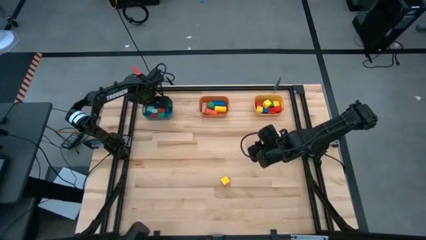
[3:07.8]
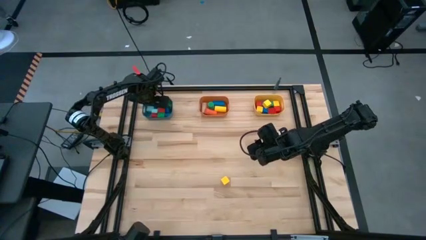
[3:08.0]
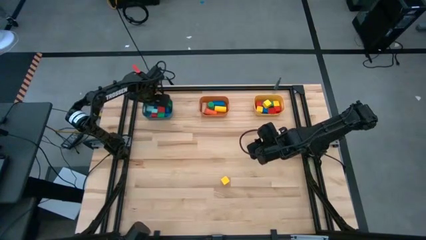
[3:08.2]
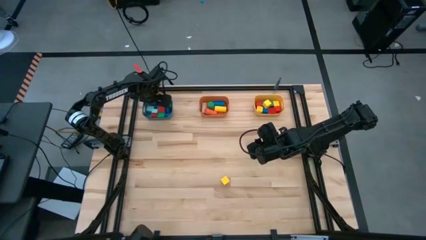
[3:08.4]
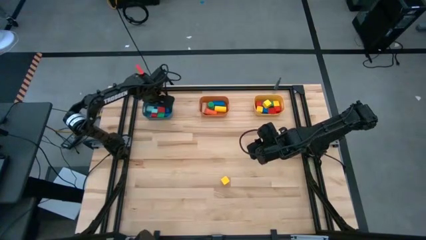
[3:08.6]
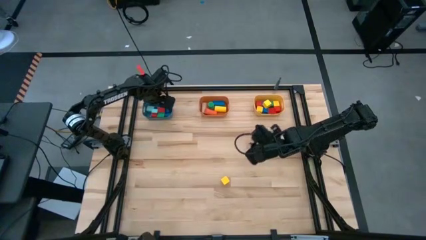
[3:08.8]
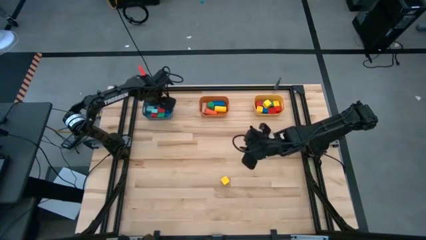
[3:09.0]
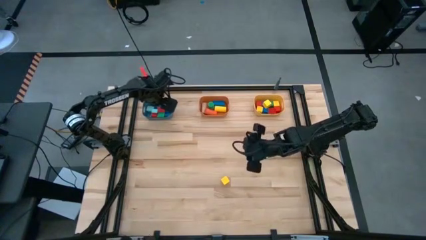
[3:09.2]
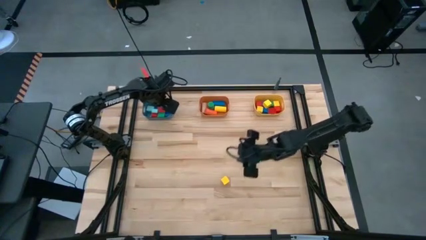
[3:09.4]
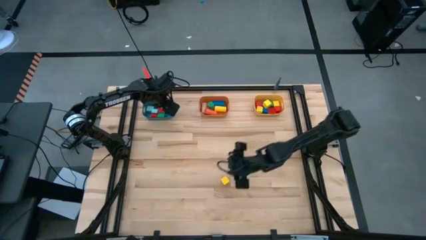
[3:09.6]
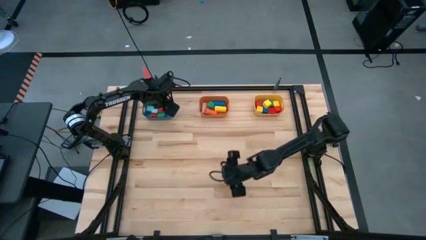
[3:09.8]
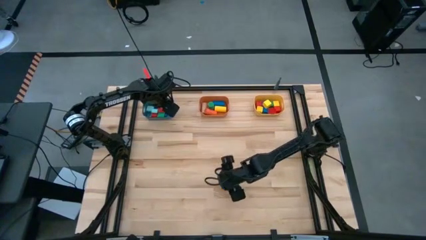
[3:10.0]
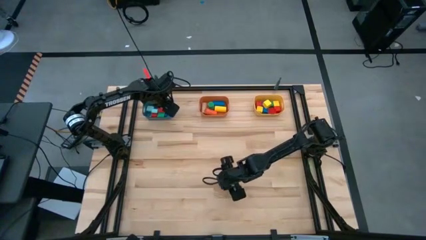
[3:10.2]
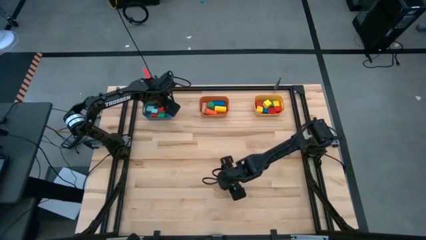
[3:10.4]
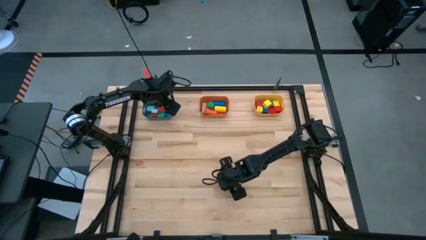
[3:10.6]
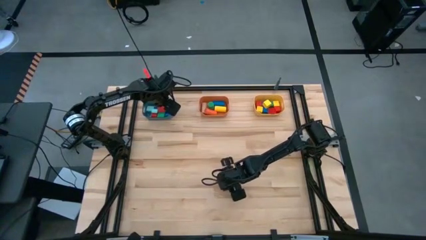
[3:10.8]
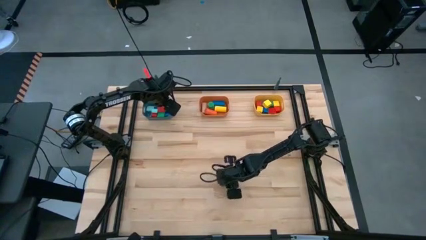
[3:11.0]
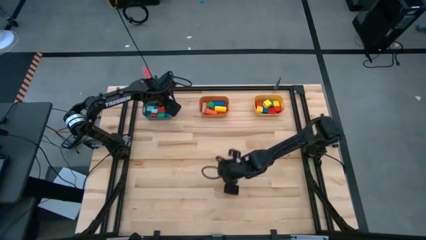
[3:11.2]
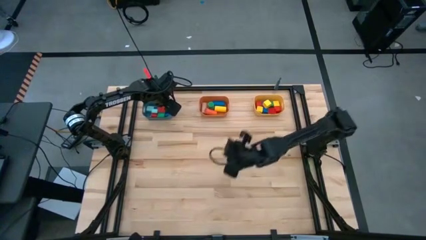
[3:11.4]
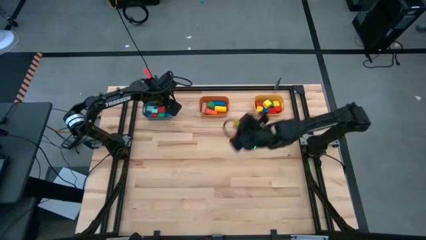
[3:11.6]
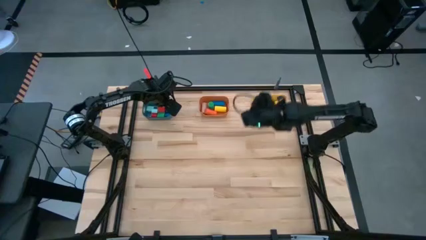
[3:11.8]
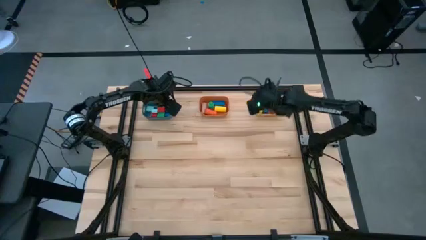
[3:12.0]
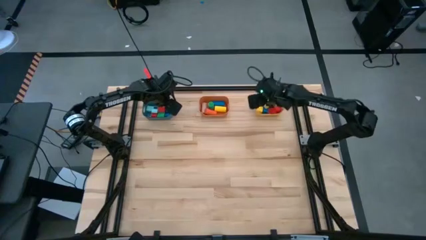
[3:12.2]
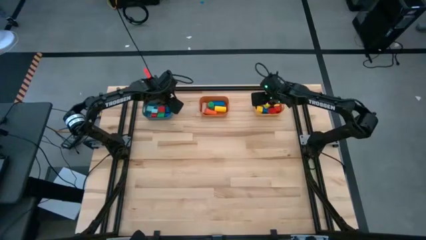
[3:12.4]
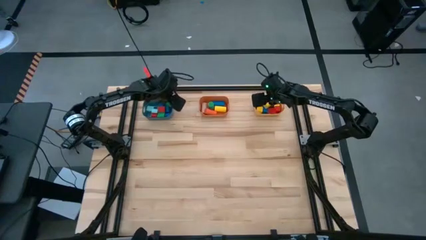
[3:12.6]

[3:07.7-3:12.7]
Task: Sort blocks by size
Put the yellow cube block into the yellow bin

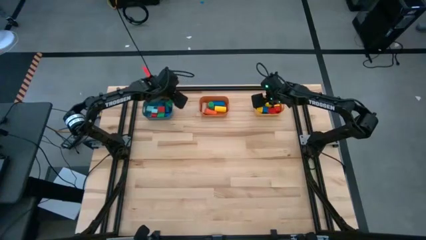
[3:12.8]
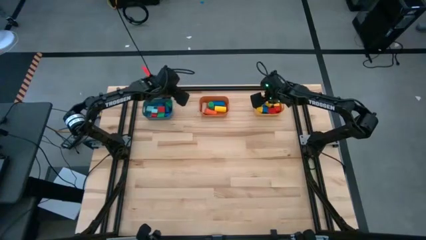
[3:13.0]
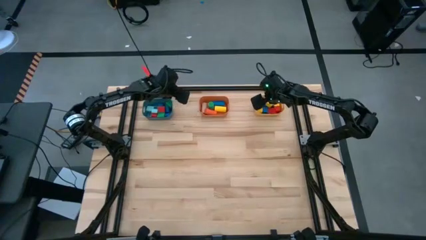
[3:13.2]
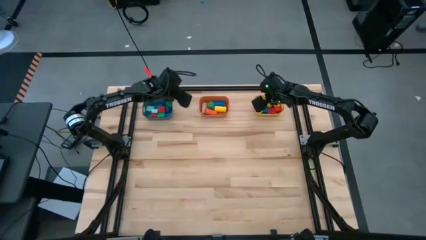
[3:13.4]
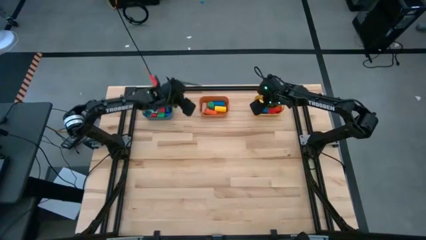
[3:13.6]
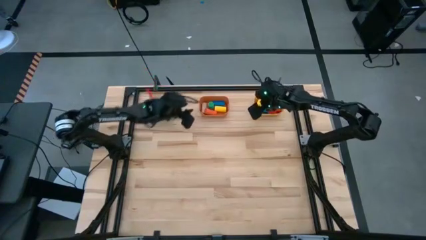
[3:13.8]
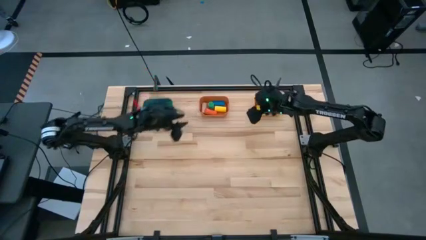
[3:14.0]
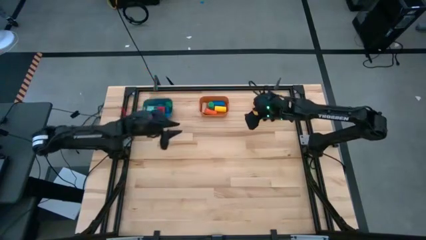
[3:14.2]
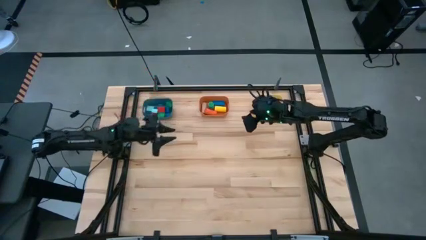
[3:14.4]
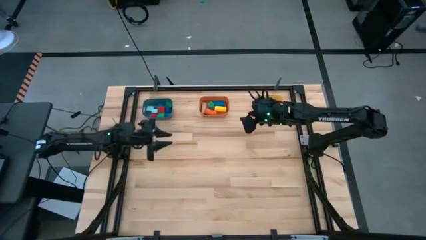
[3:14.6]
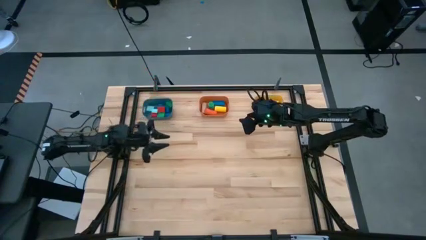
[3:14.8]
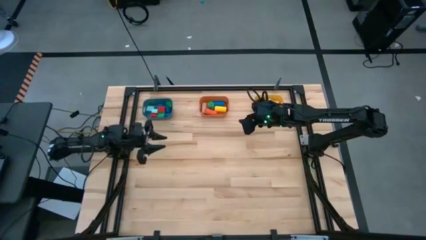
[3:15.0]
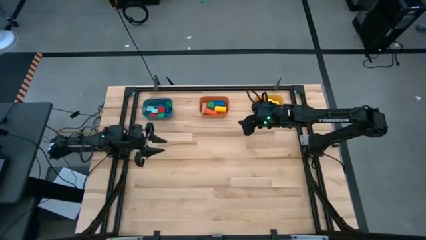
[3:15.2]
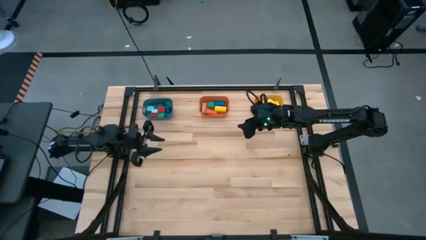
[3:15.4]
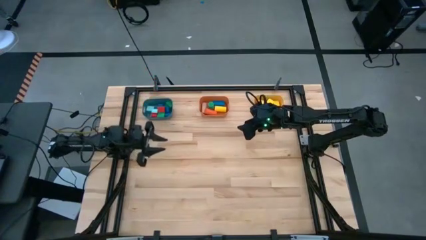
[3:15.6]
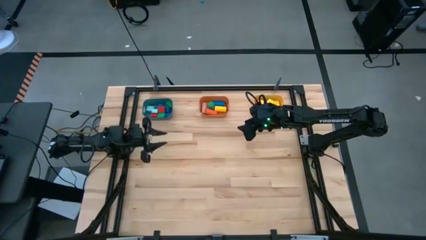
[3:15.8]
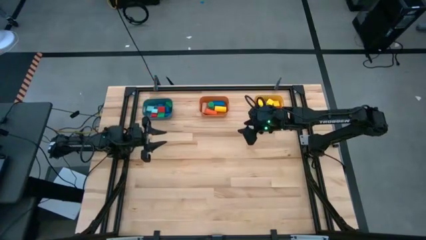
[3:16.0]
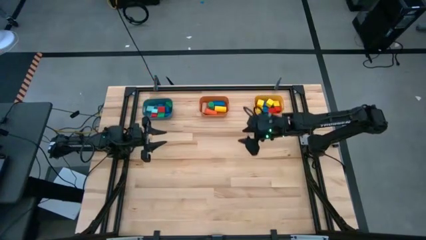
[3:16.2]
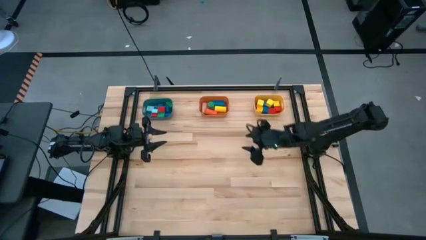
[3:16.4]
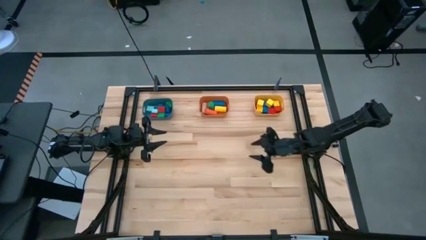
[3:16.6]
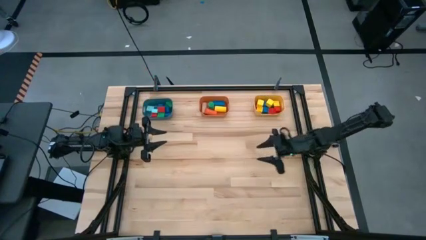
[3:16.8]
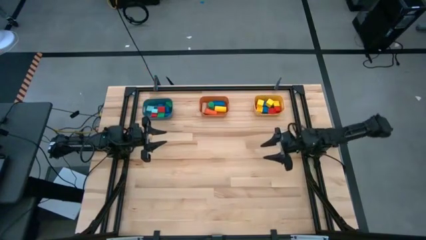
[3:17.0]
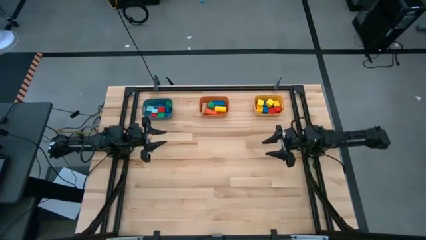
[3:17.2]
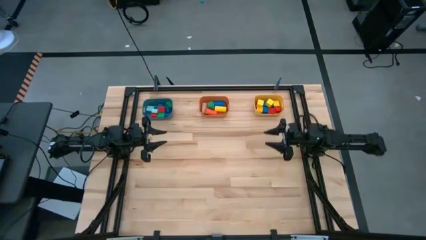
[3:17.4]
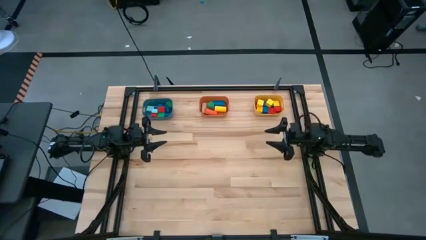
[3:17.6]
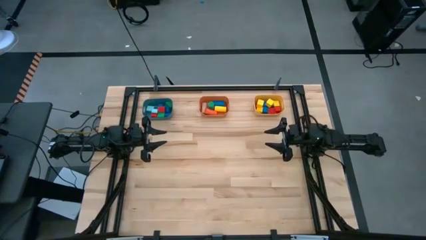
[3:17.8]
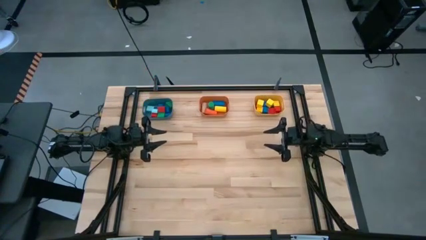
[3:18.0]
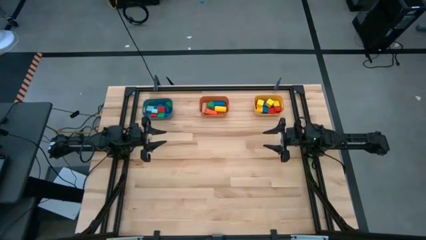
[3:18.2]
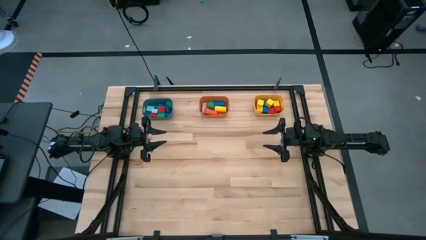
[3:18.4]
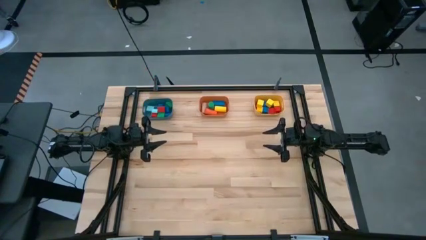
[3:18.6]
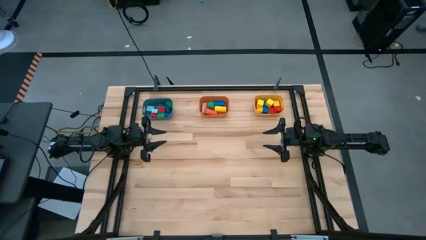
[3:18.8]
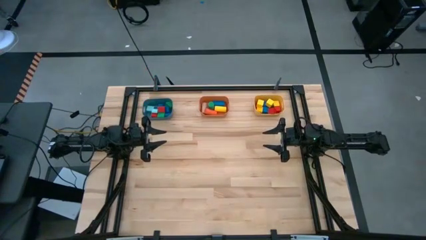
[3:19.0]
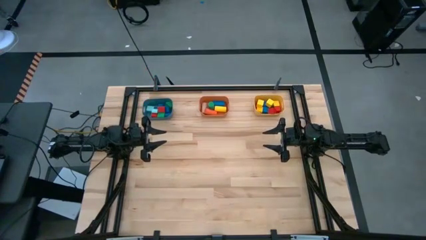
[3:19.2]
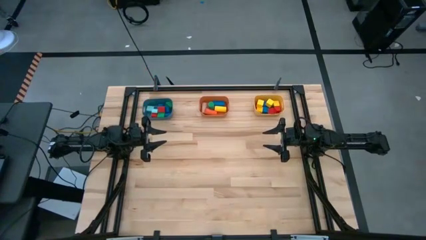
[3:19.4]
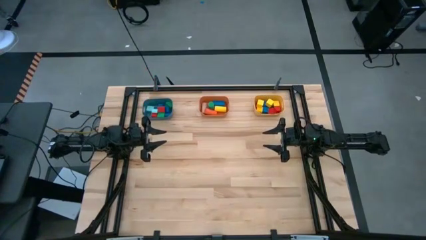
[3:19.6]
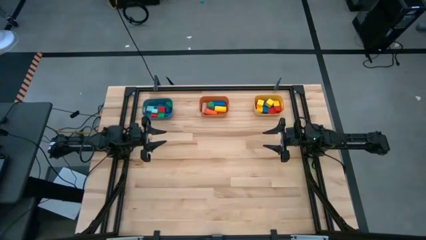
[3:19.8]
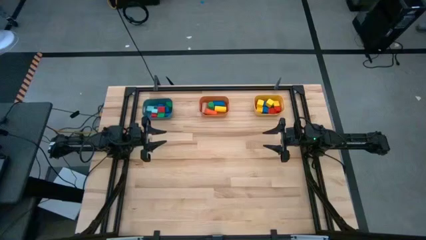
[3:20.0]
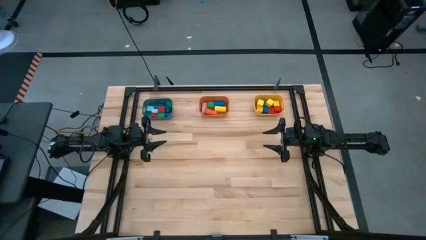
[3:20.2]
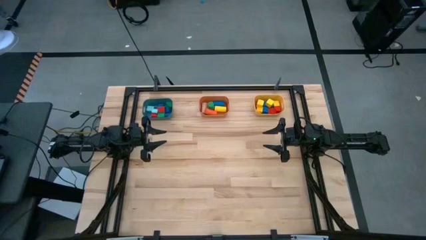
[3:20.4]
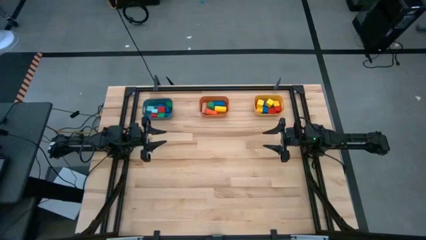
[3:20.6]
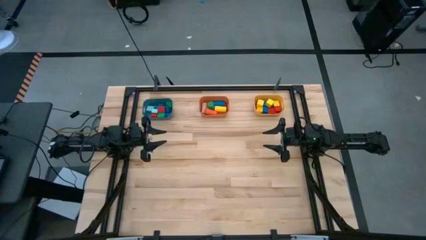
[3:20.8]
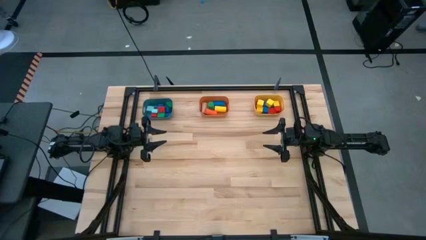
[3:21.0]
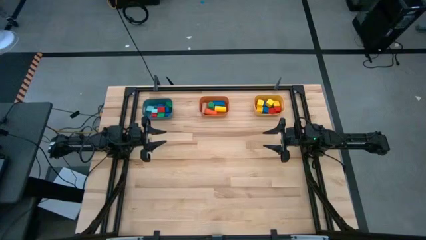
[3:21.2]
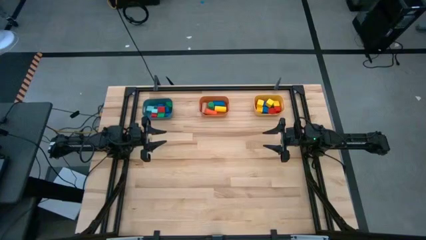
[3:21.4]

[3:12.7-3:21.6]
Return to home position

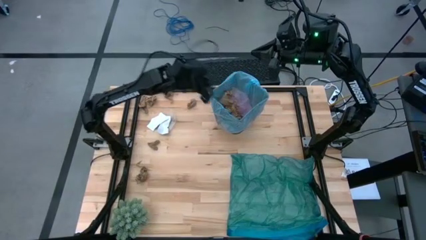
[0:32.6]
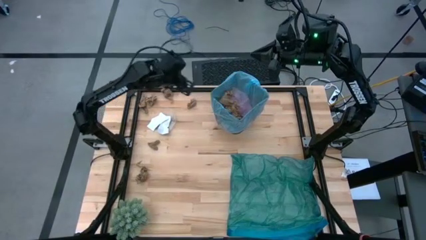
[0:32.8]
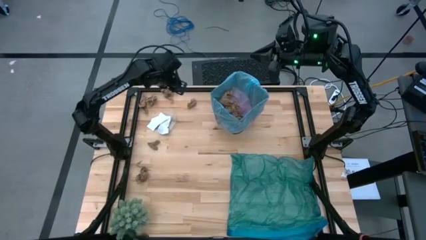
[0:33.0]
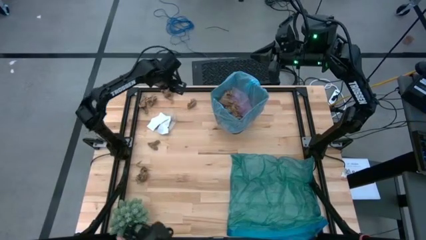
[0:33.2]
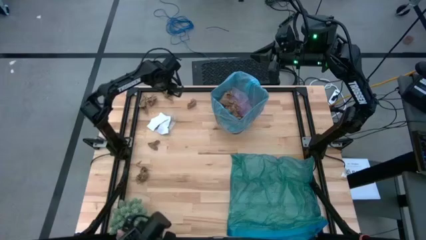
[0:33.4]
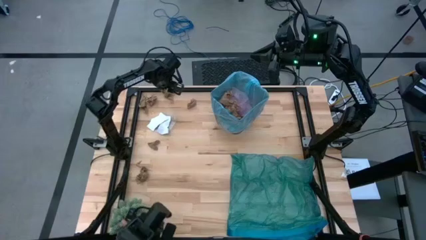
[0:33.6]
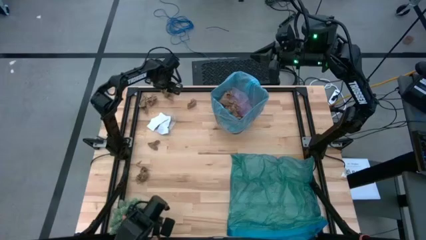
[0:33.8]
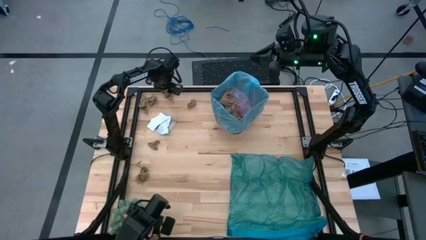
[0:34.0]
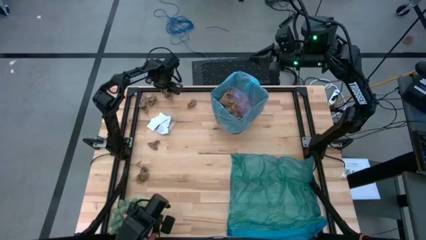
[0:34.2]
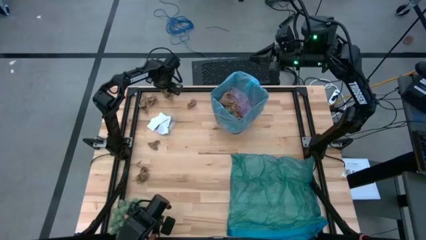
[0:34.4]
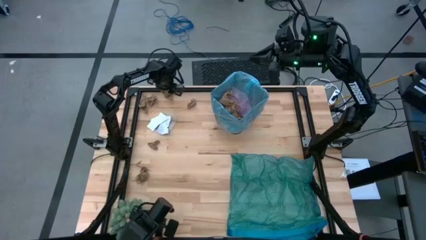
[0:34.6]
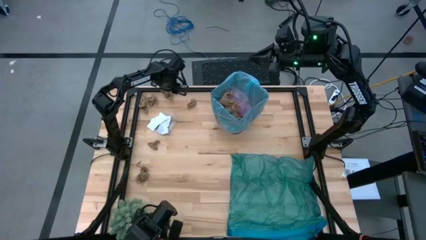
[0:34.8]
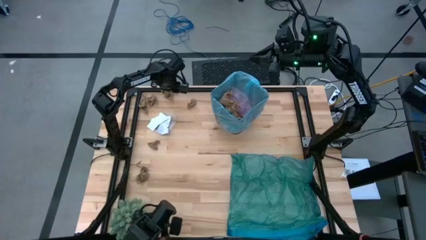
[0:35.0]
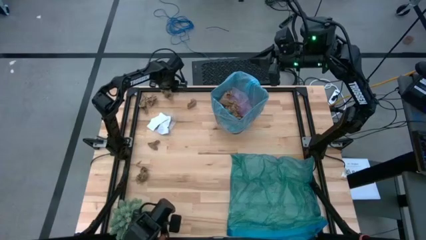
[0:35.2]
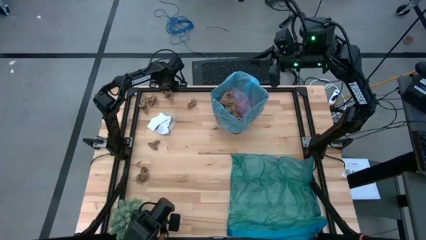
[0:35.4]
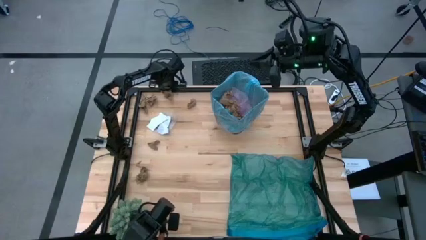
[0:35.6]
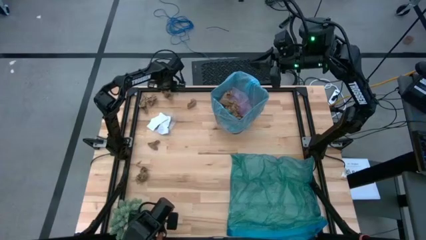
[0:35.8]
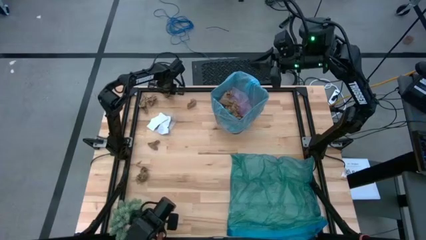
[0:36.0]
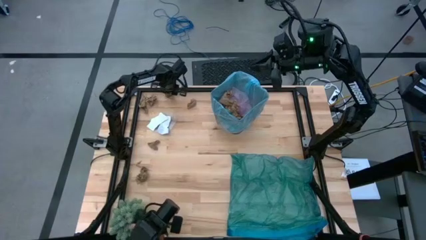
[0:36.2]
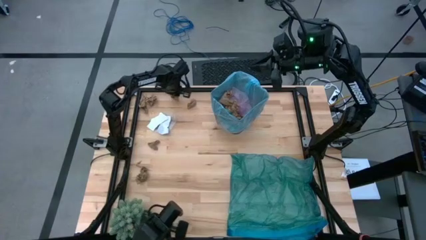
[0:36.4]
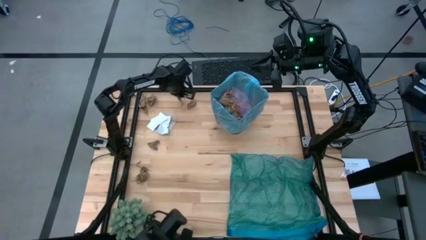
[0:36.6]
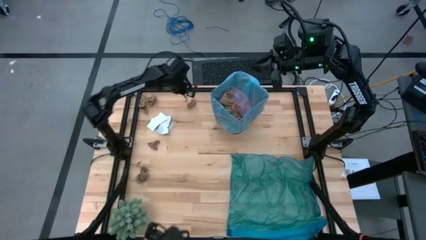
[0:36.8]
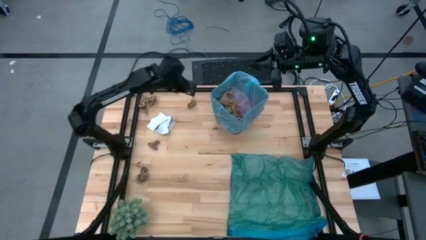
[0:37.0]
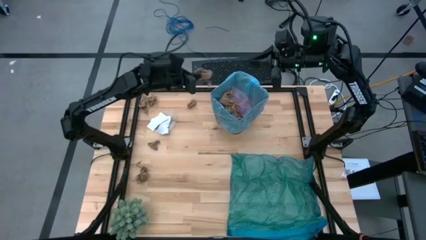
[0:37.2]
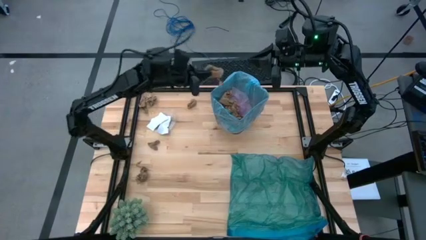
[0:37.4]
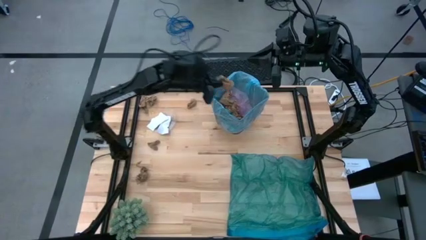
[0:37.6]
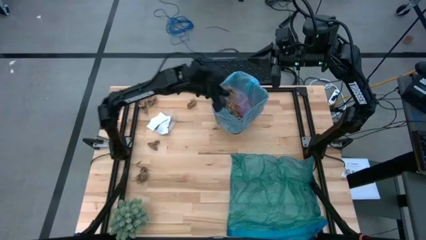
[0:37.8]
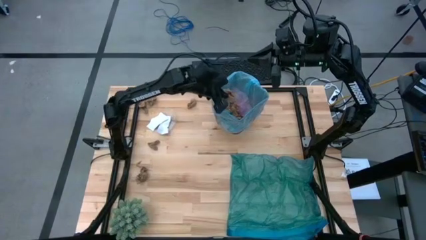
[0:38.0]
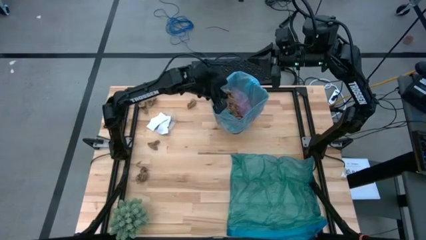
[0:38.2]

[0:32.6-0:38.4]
Task: place trash/remove bag and relplace
Put the brown napkin into the black trash bin
